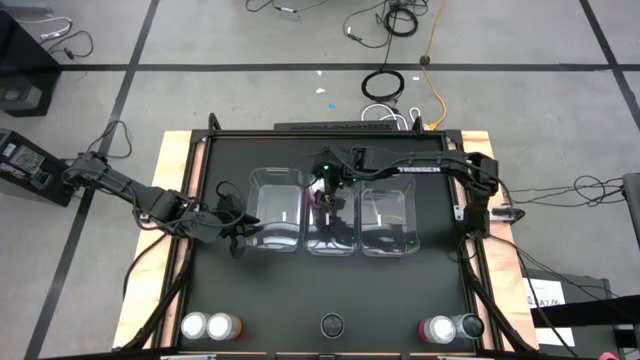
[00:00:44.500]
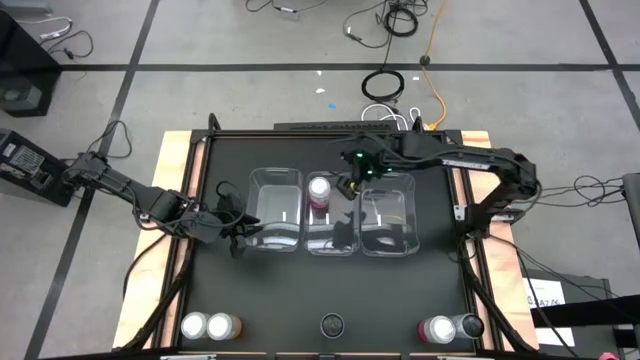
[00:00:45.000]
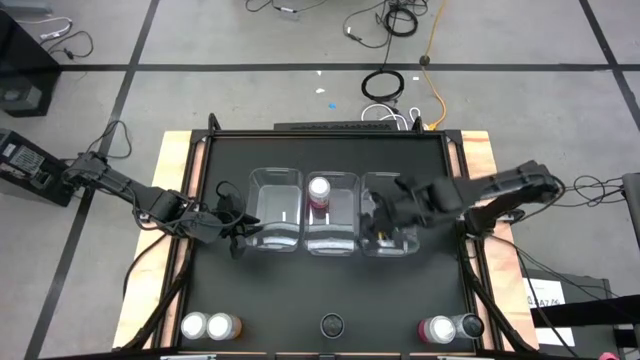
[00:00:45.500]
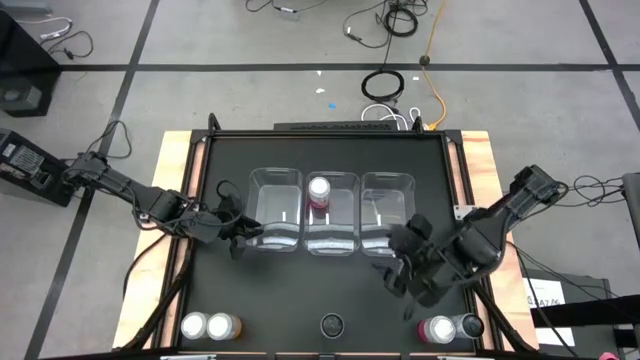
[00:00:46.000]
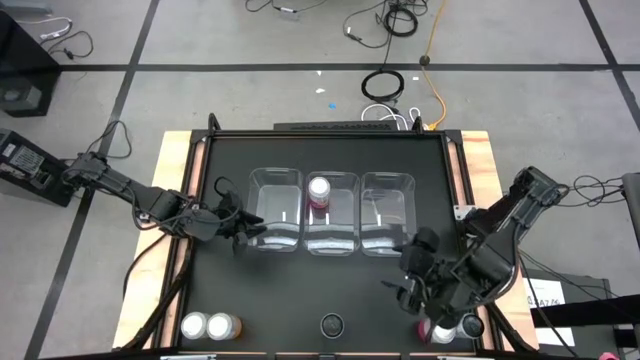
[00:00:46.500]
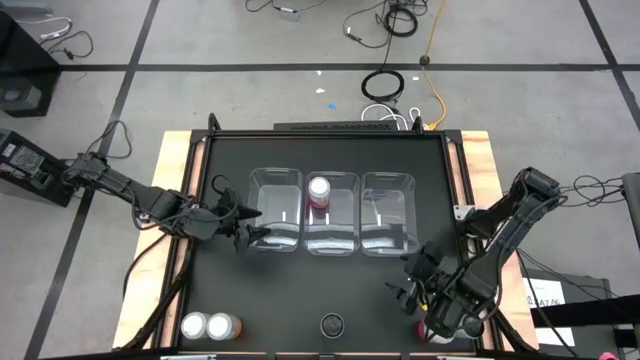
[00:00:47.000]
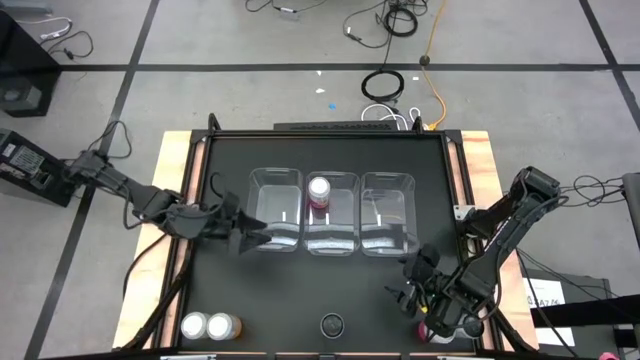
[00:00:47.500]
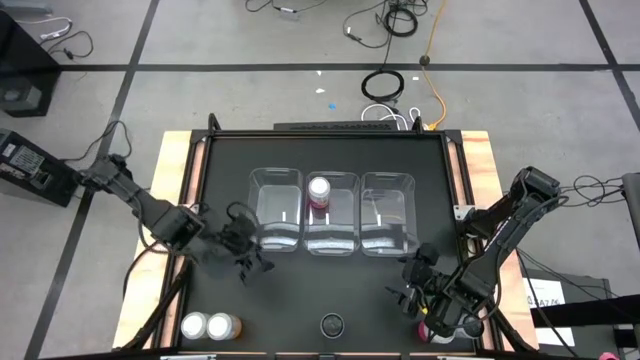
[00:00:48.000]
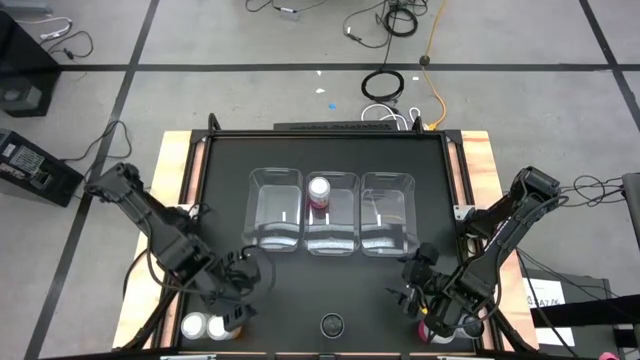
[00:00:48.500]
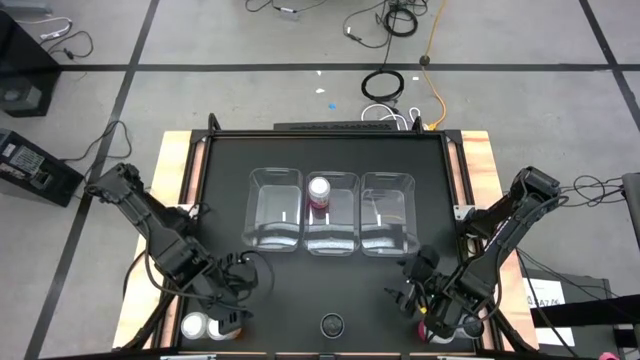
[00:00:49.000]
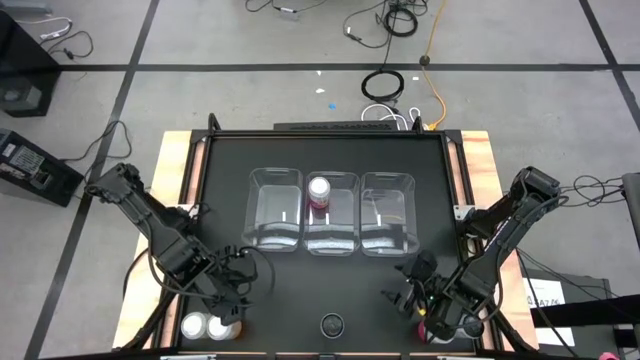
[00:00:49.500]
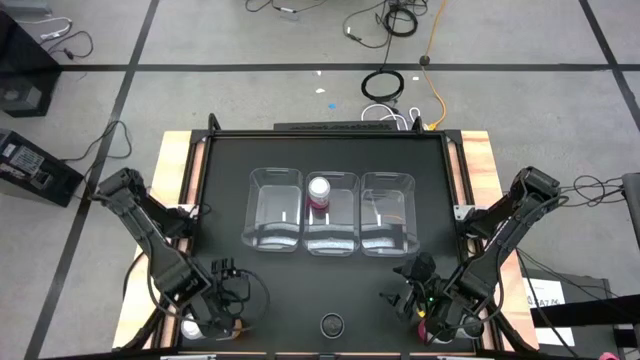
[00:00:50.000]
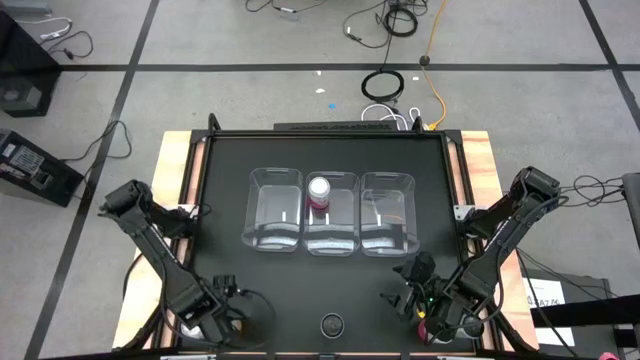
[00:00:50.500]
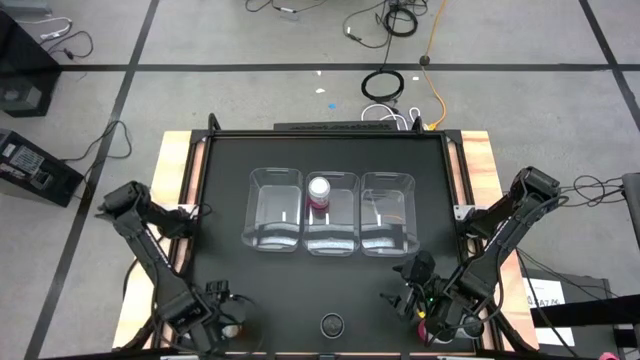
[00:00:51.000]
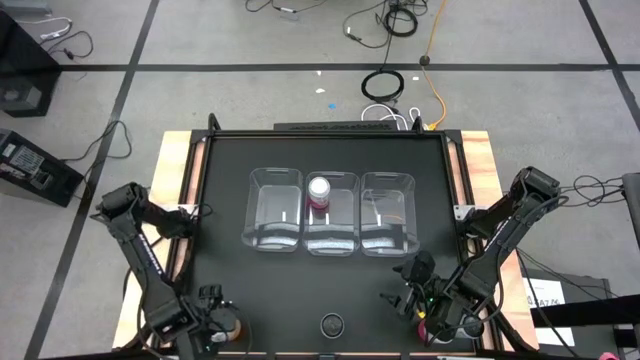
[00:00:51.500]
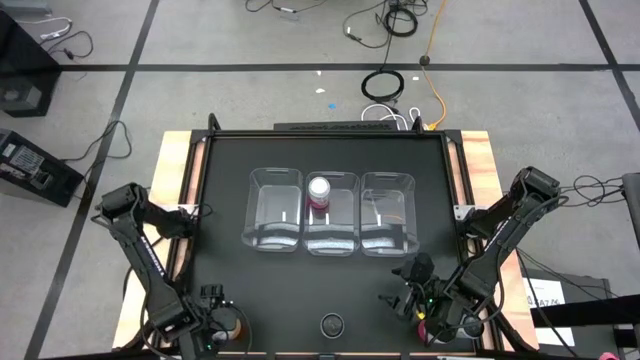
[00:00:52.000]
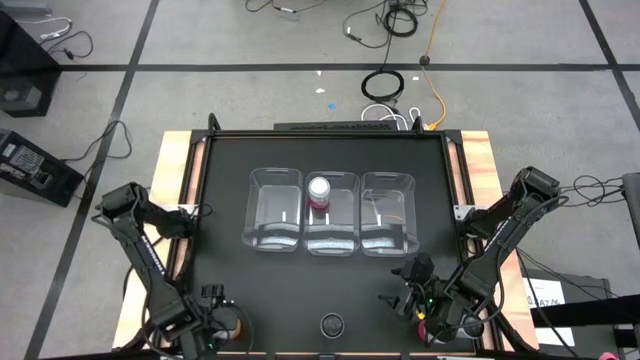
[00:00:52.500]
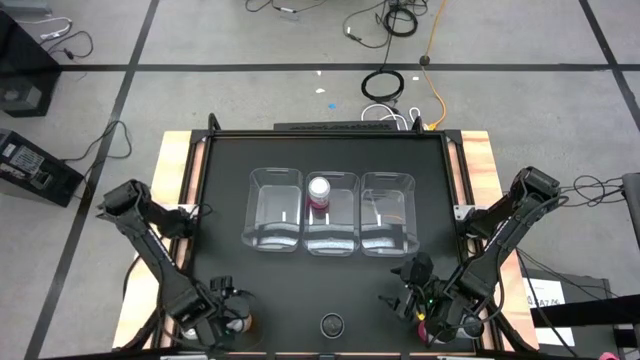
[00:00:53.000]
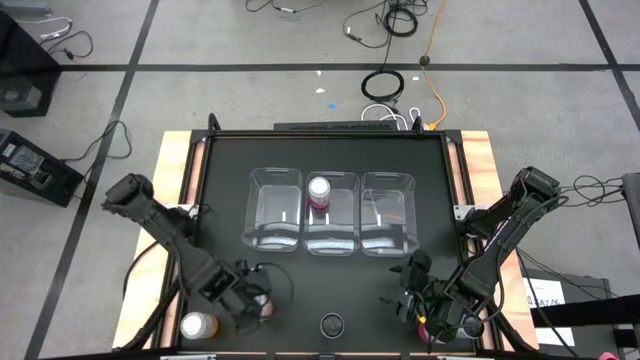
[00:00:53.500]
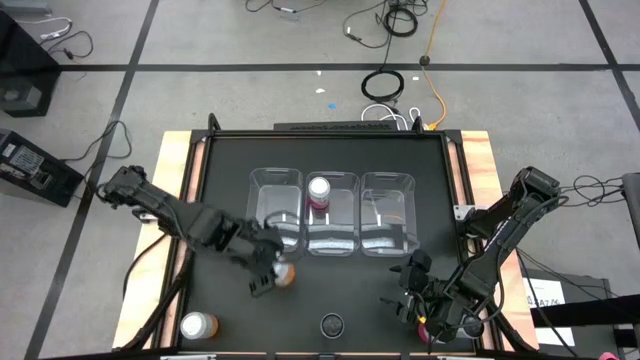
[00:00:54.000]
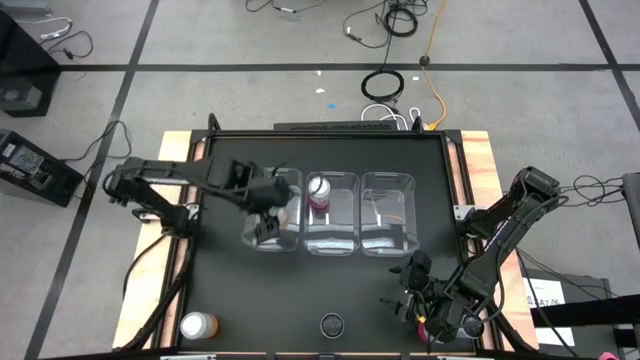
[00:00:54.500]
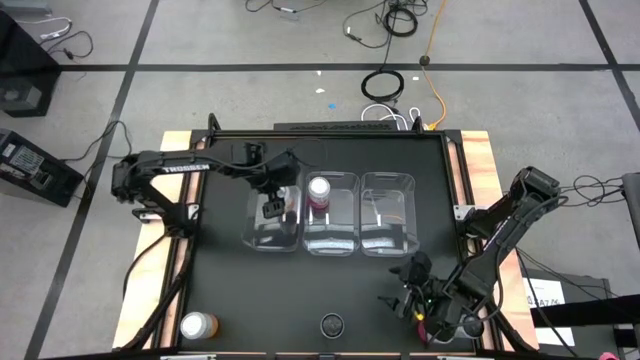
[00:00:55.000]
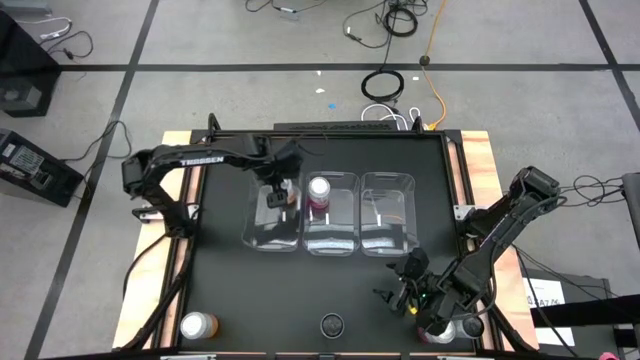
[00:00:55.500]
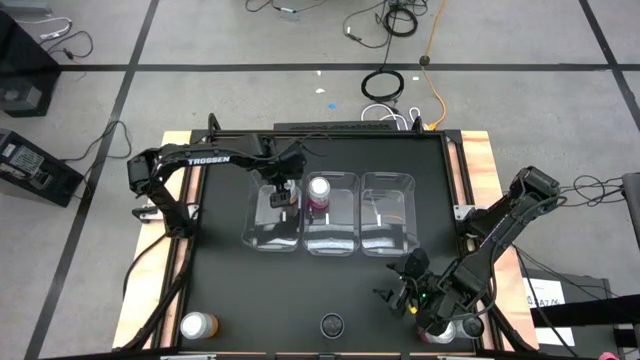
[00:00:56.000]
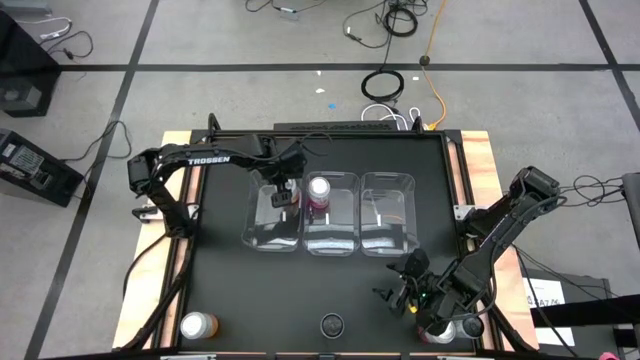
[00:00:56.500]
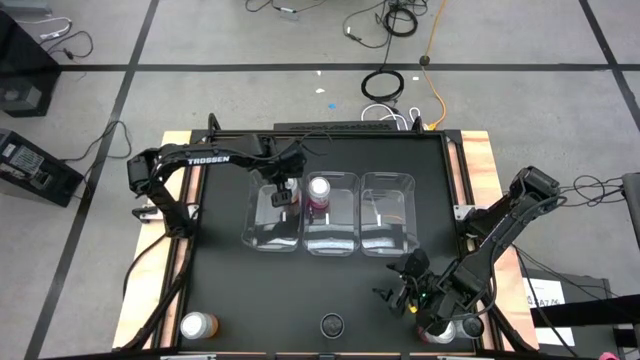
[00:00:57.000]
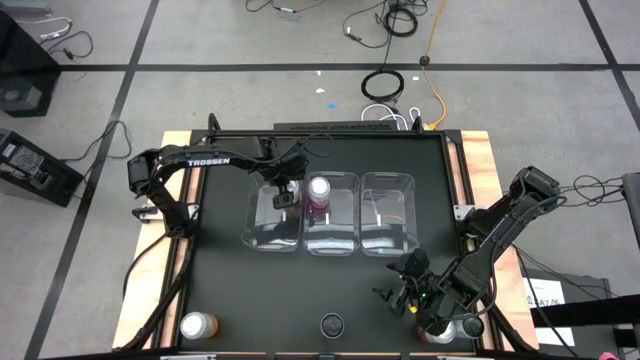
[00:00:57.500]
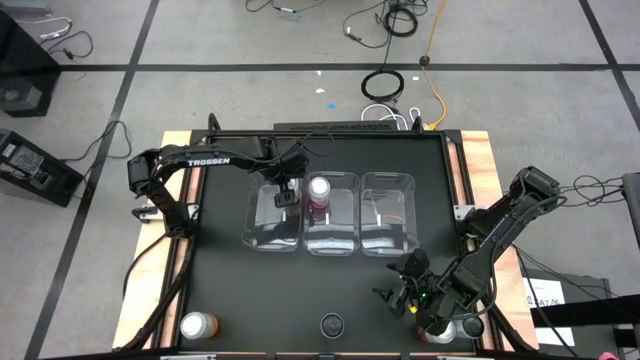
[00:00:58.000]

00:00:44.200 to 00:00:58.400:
Task: Sort soda cans
Put the right yellow-white soda can into the middle left transparent bin

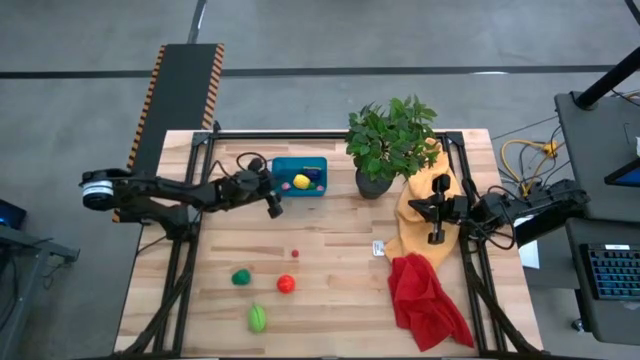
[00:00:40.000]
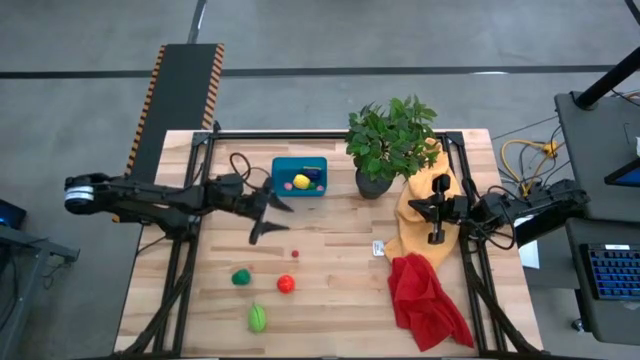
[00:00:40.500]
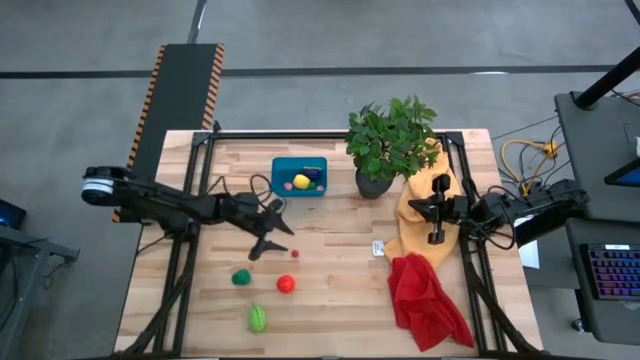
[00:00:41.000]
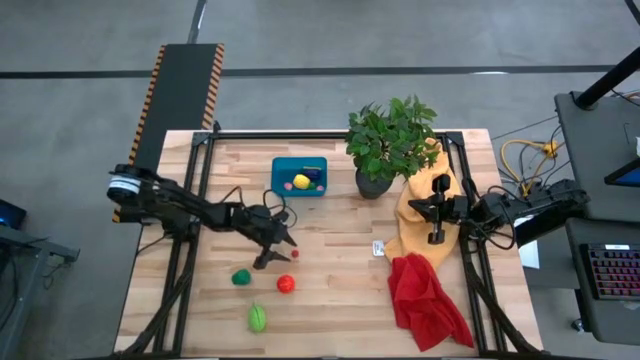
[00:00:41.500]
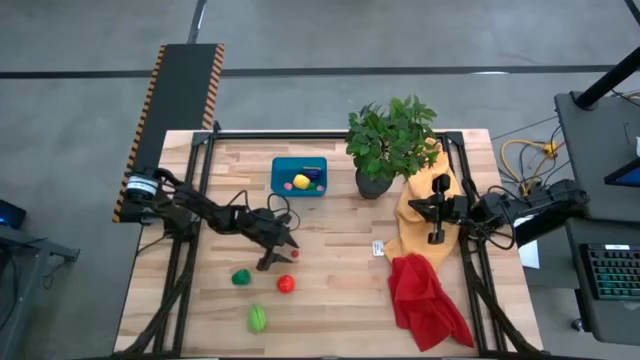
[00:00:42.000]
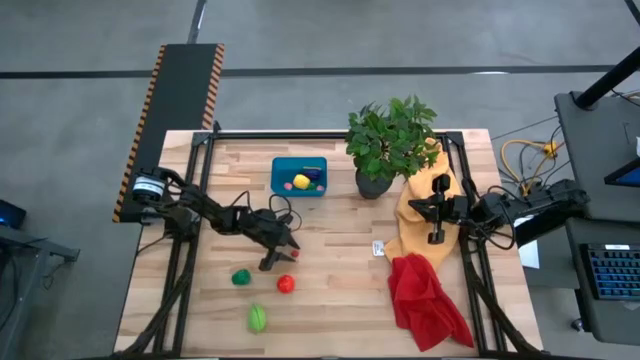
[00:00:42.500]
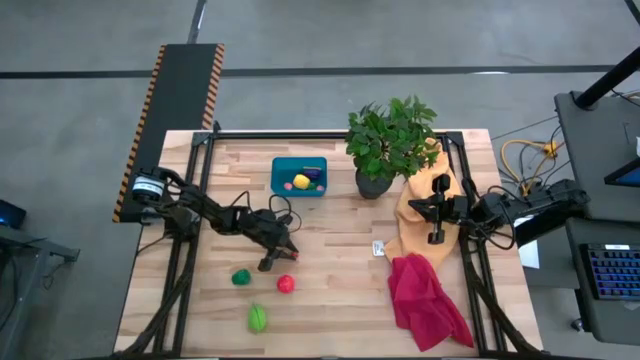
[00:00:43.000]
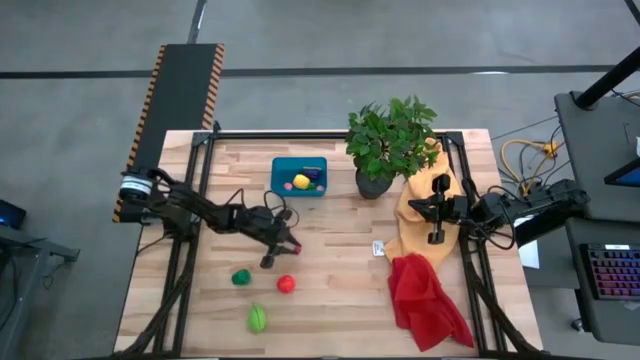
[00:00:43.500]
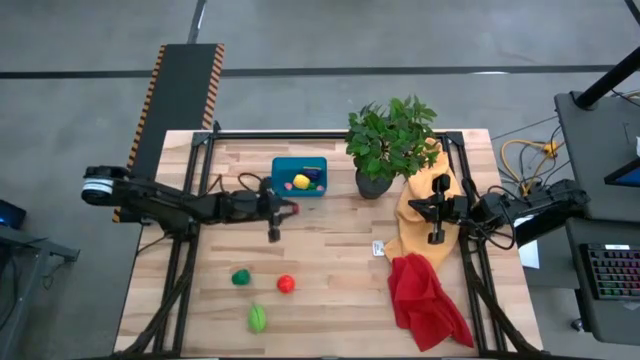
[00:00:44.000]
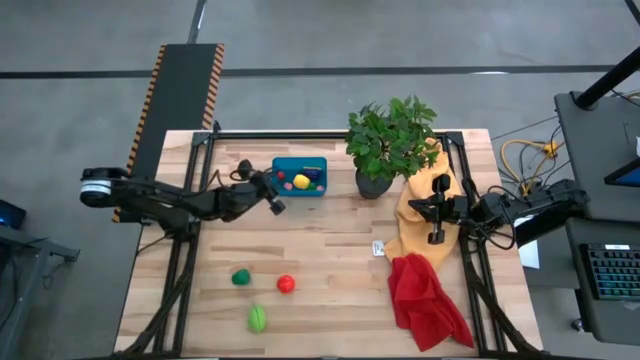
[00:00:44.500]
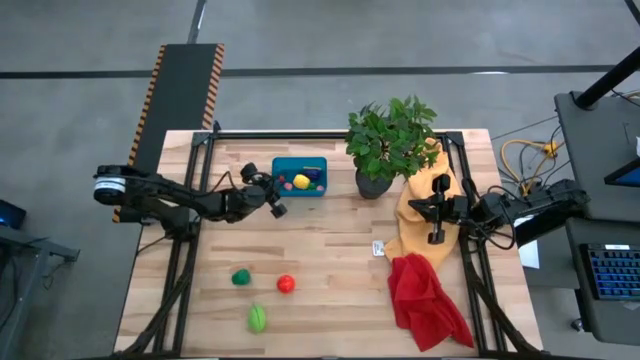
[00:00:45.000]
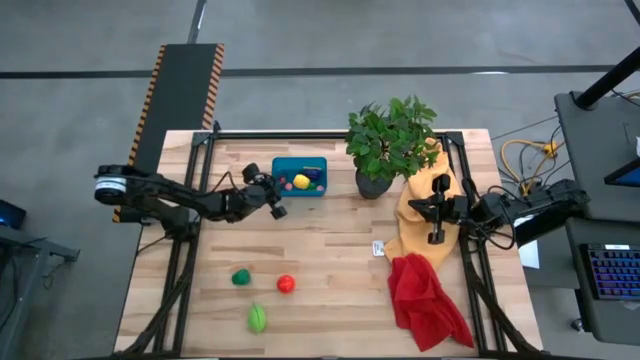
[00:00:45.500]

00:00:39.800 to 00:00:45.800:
Task: Pick and placing Produce into tupperware
Put the raspberry into the bin

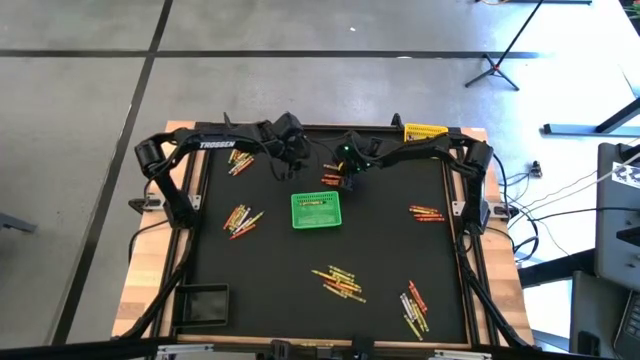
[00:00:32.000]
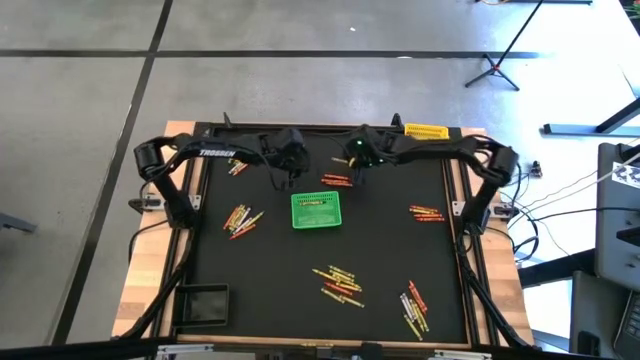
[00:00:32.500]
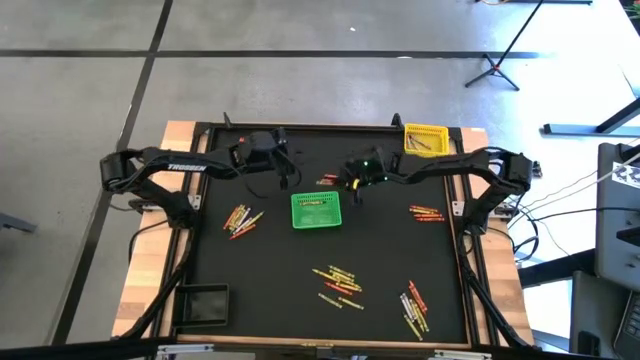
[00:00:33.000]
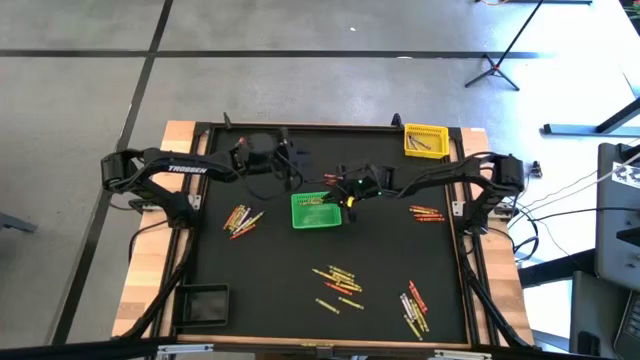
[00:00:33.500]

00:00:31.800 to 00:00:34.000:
Task: Sort crayons
Put the green crayon into the green bin
